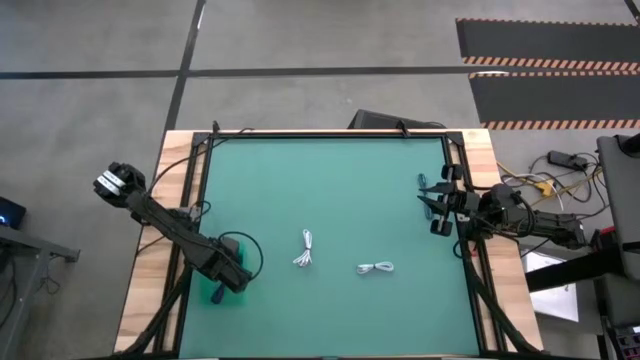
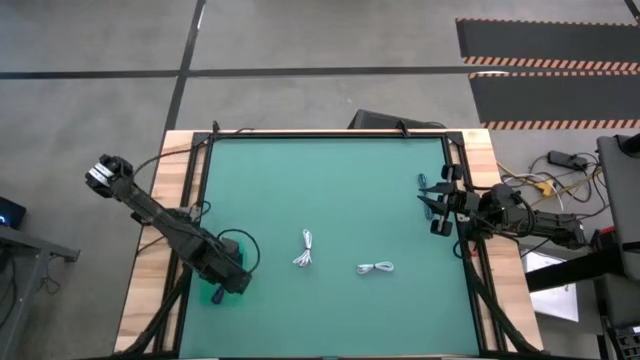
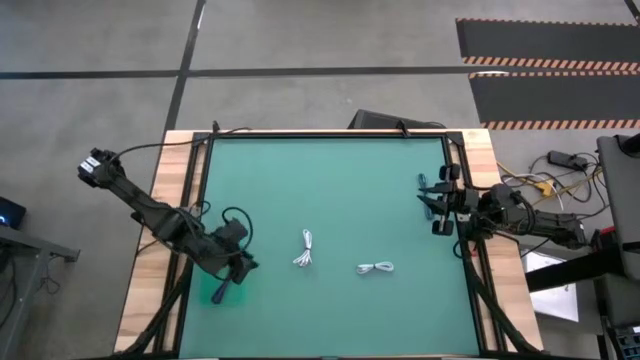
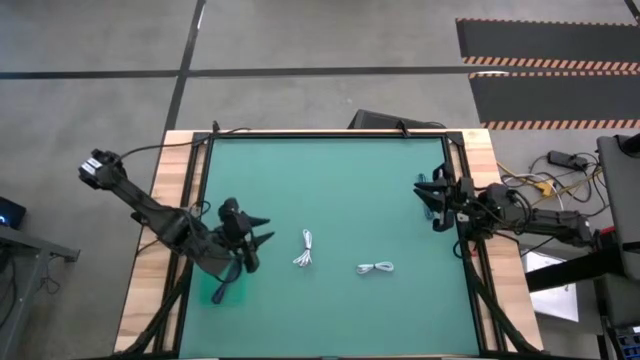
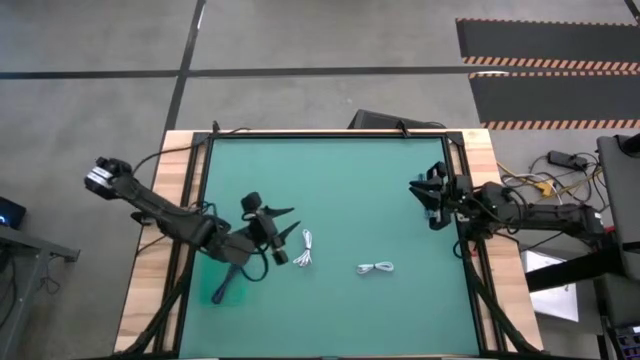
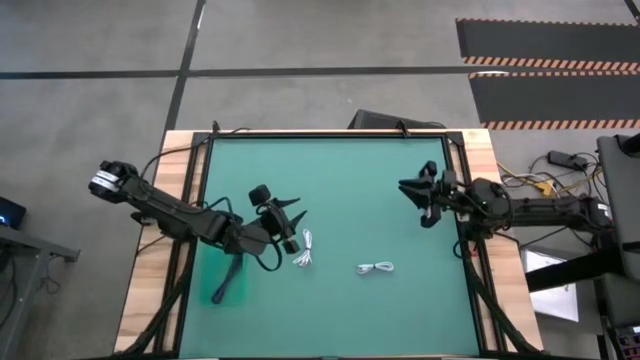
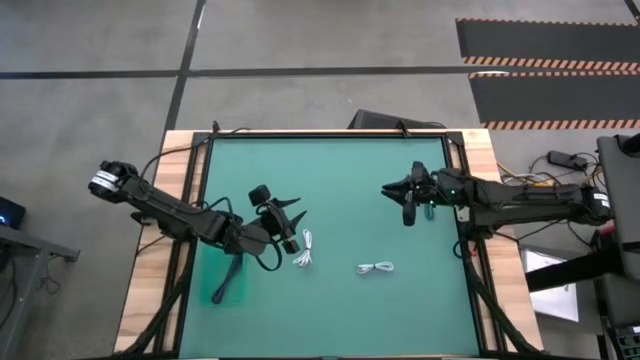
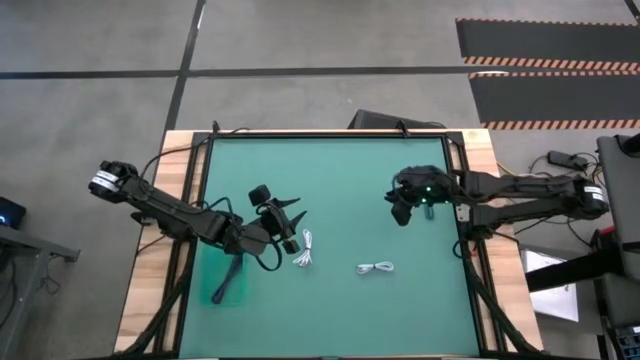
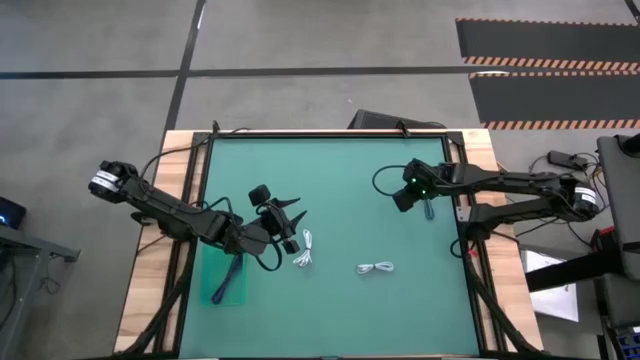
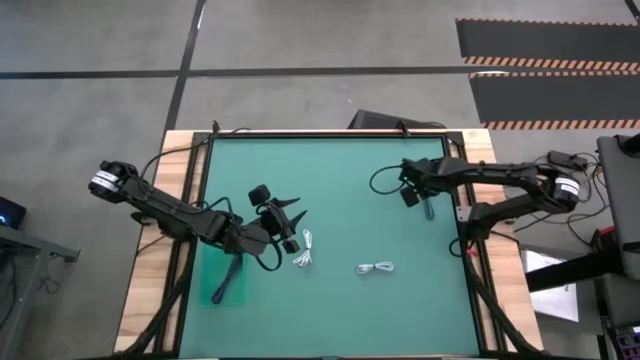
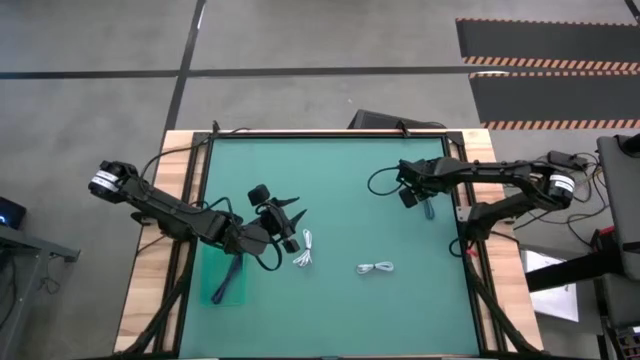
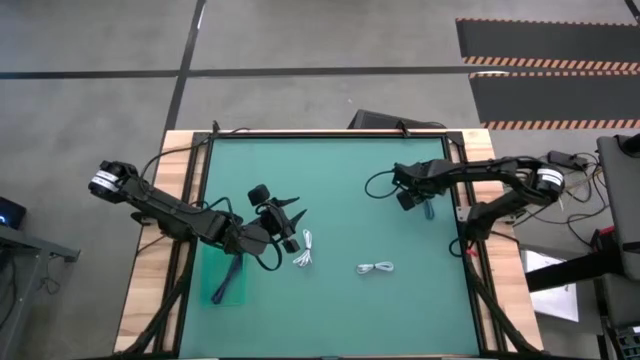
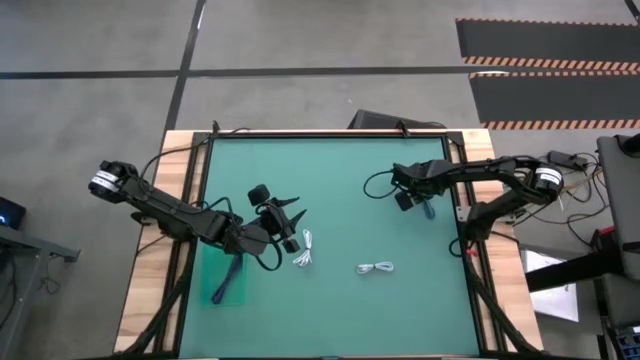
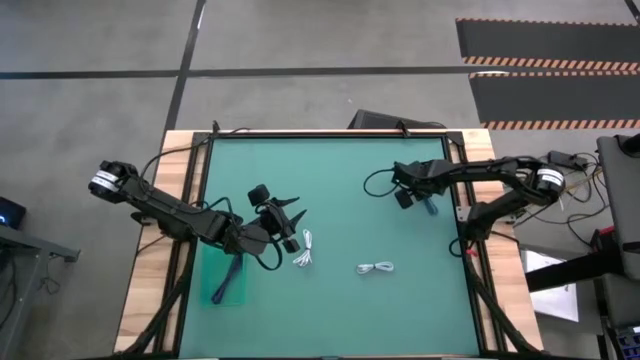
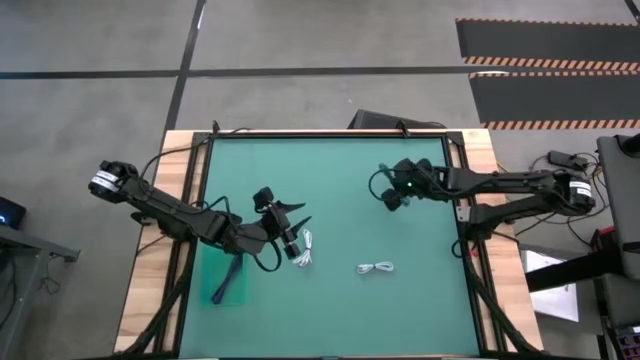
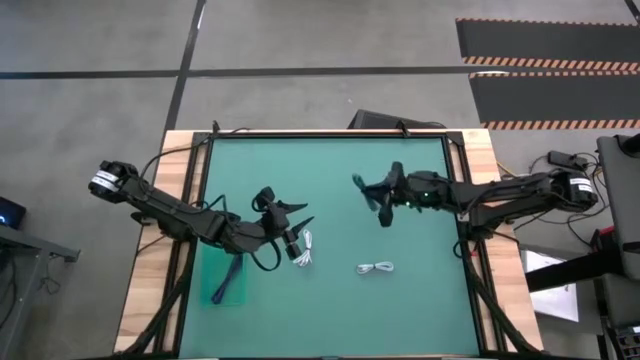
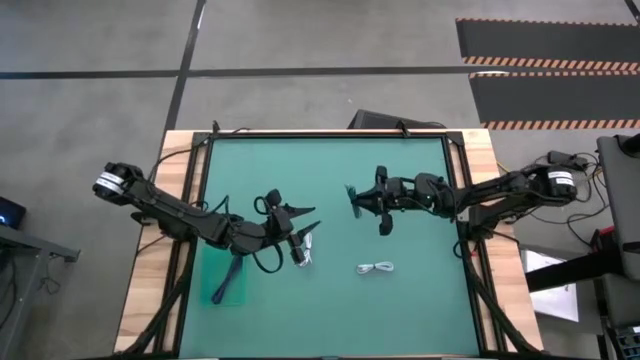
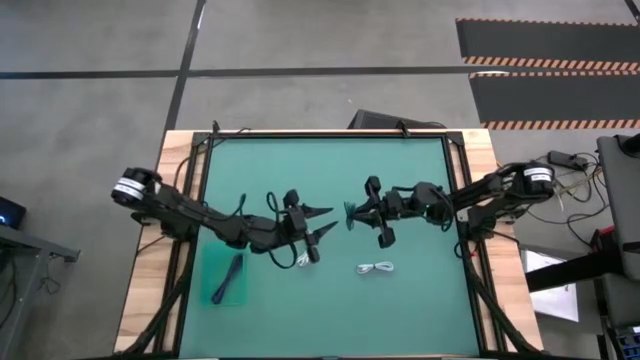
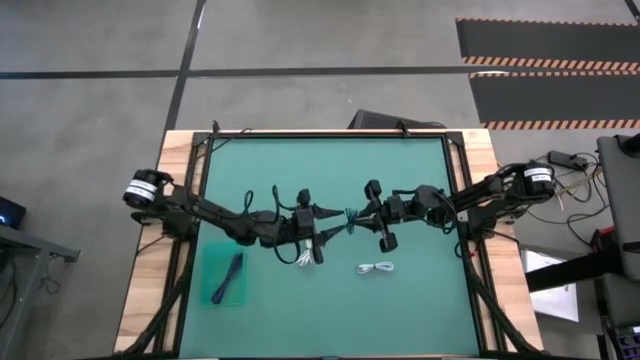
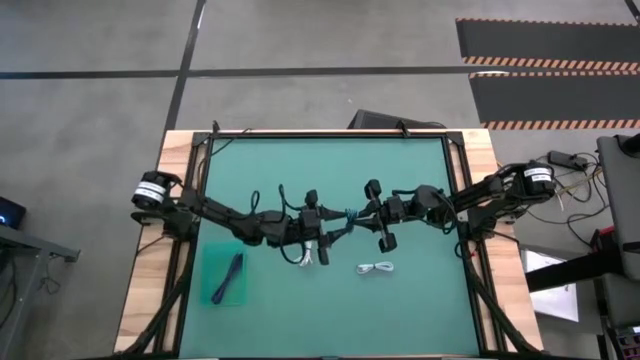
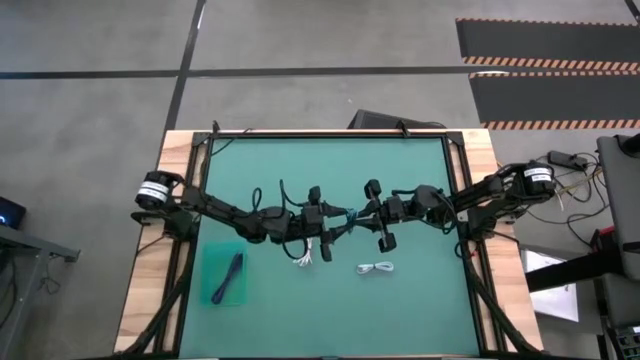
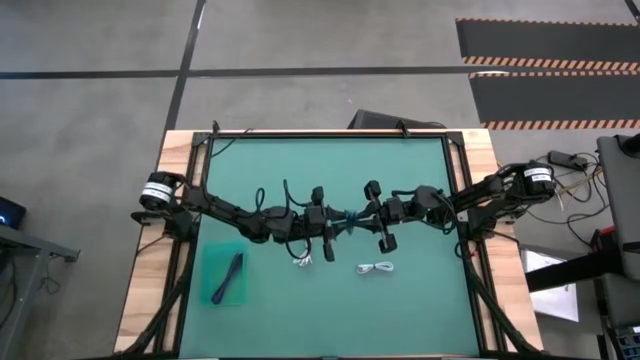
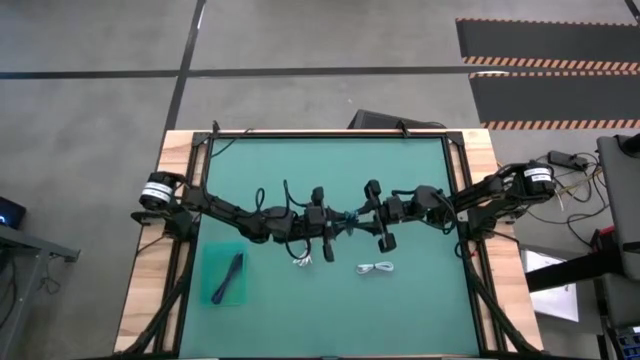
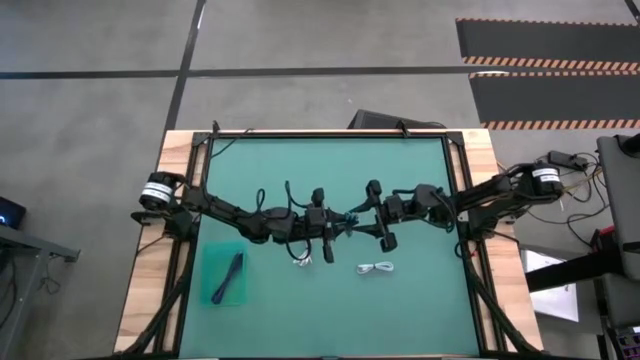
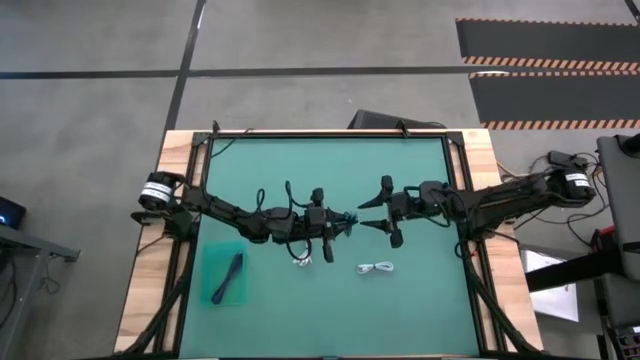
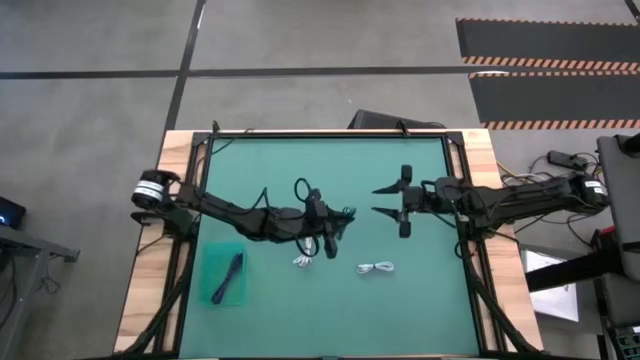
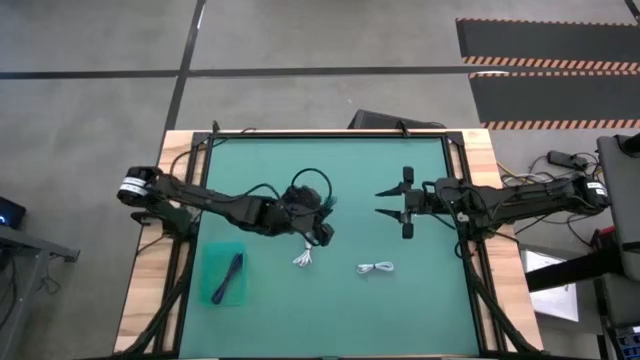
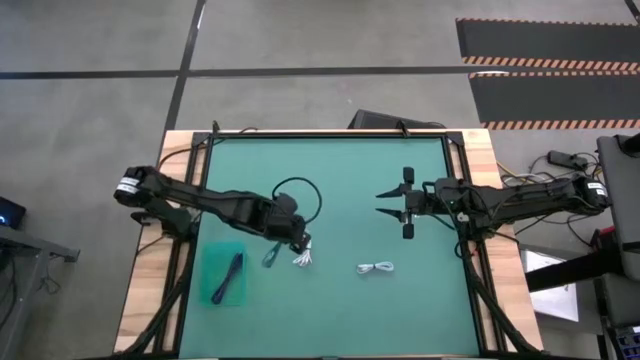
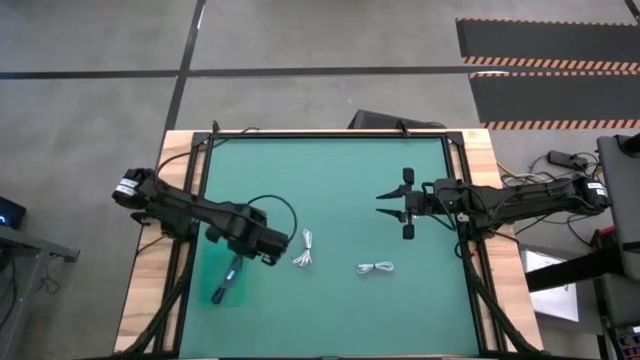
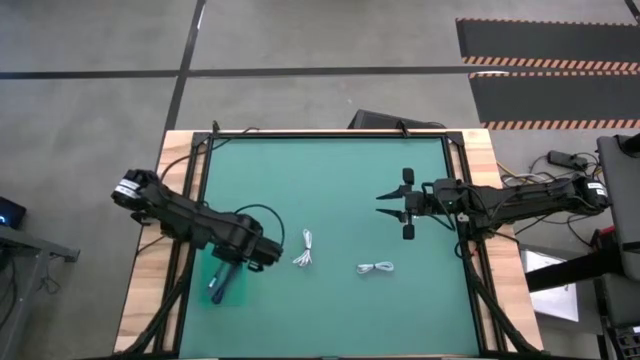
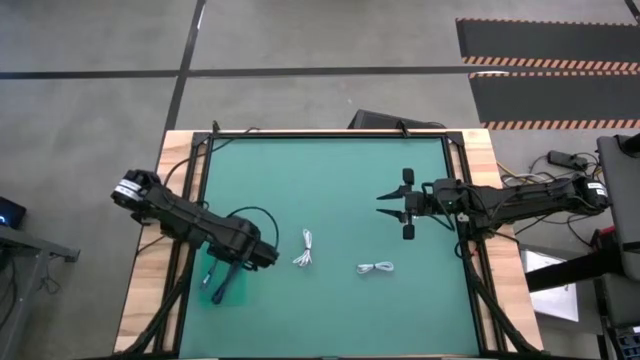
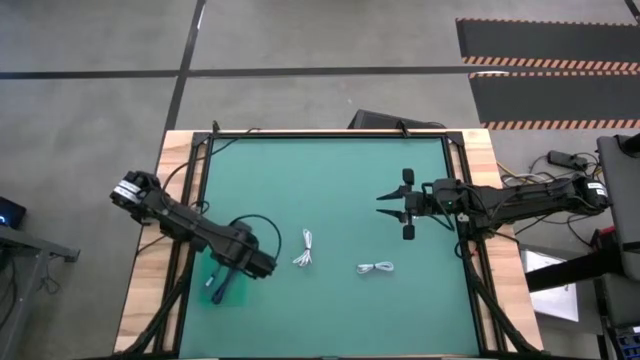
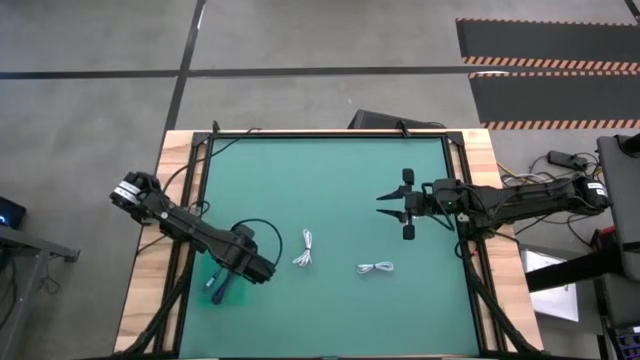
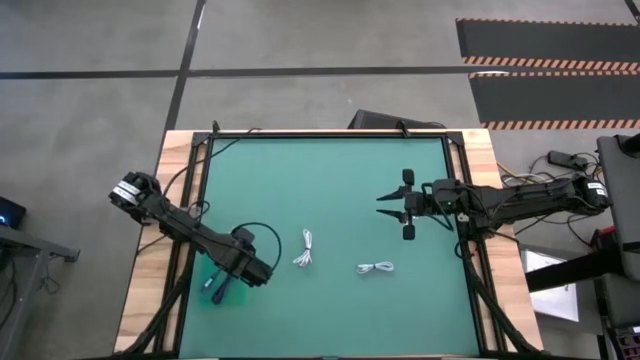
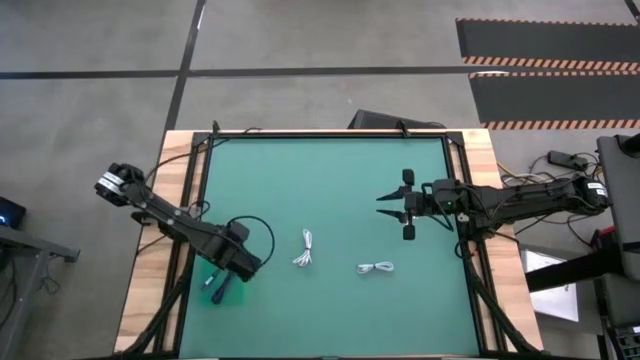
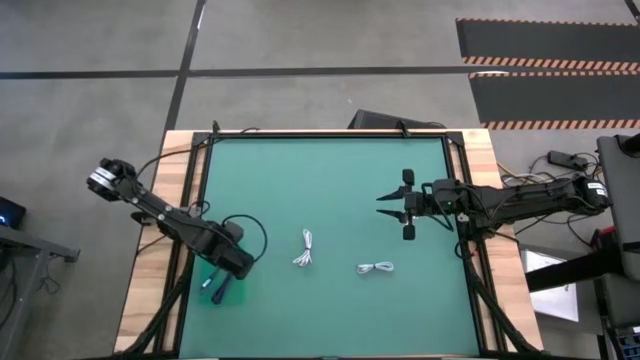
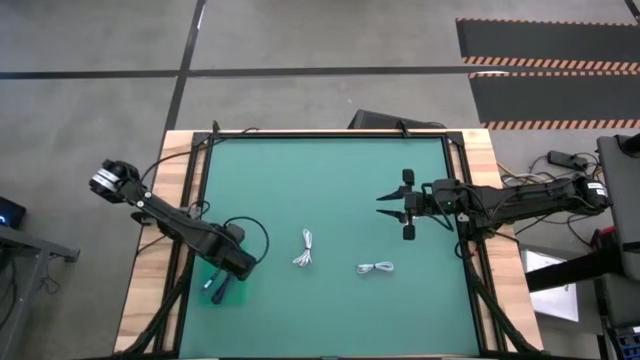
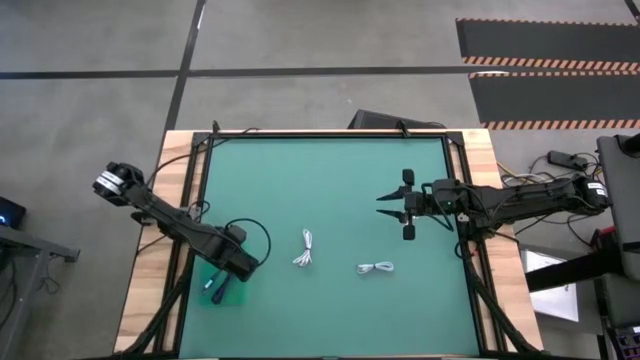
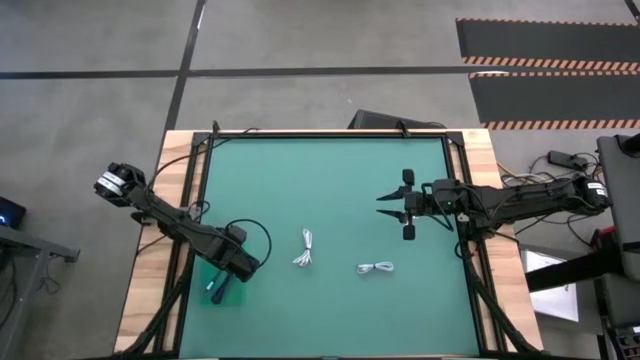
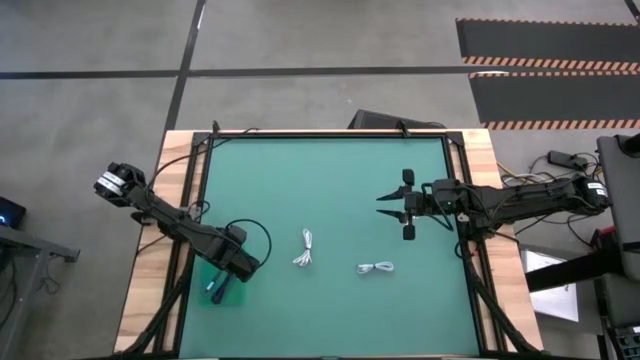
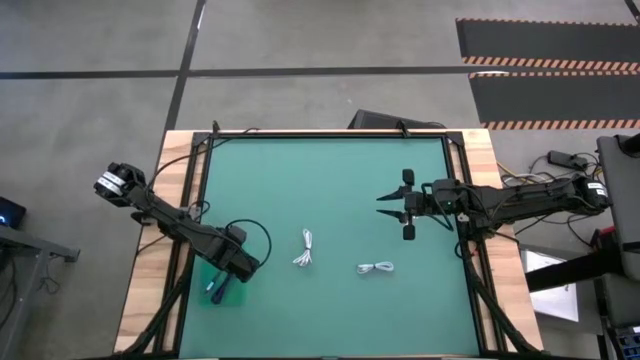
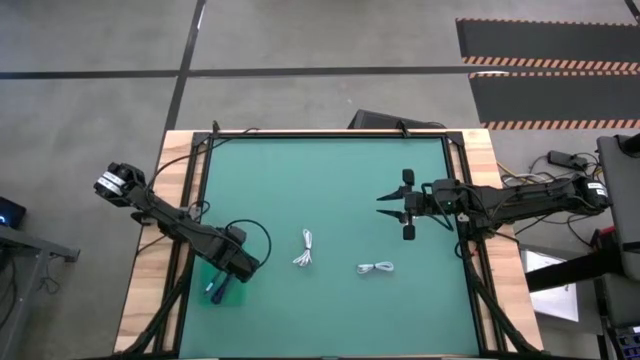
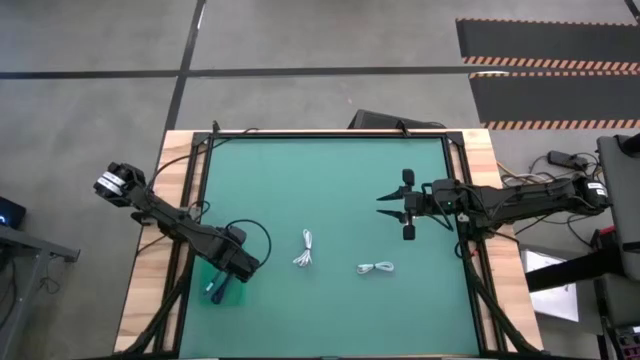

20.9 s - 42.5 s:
Task: Pick and place USB-C Cables
Put the black blue charger cable into the green bin
